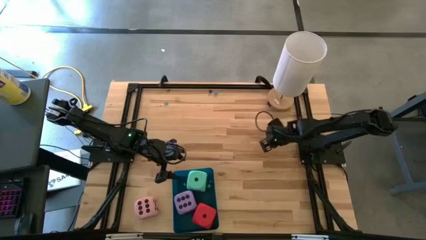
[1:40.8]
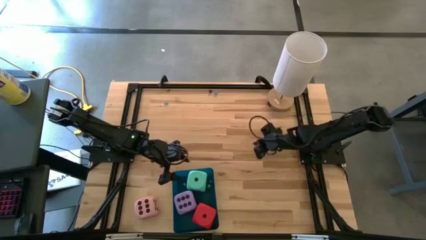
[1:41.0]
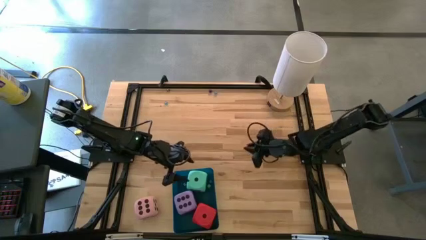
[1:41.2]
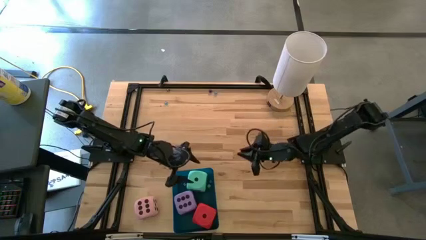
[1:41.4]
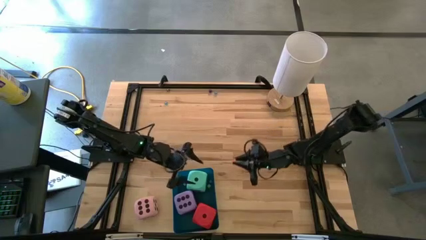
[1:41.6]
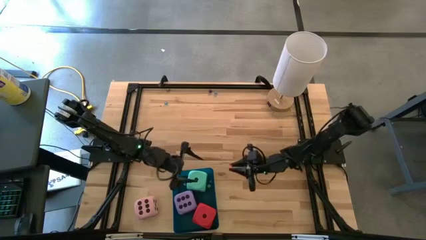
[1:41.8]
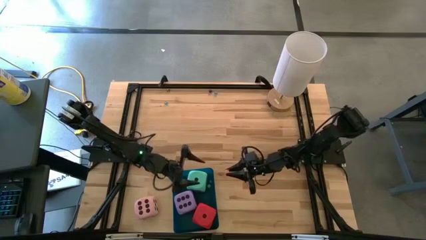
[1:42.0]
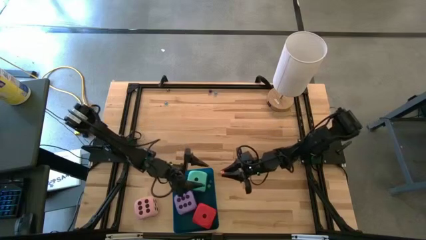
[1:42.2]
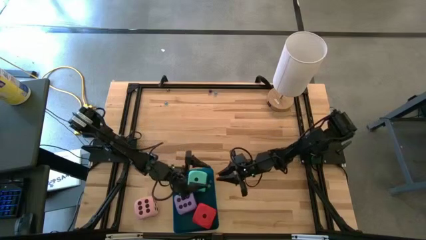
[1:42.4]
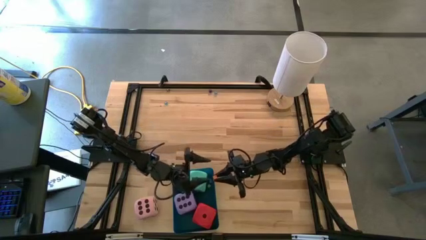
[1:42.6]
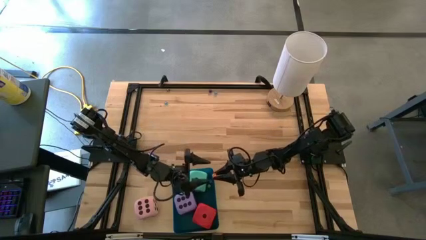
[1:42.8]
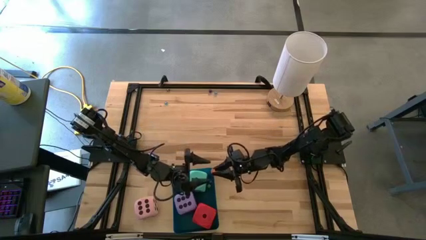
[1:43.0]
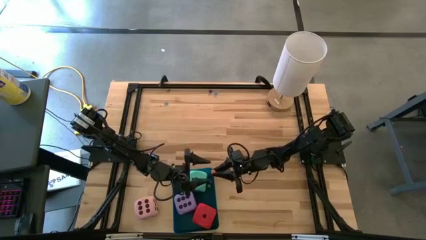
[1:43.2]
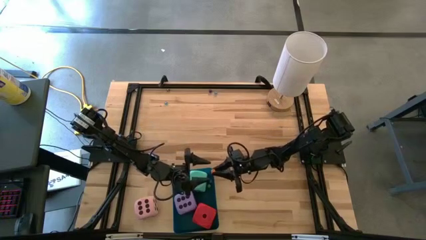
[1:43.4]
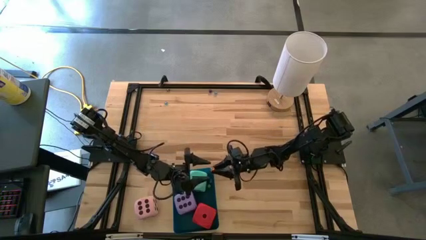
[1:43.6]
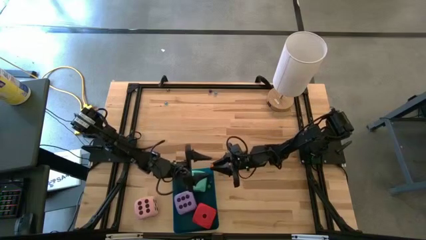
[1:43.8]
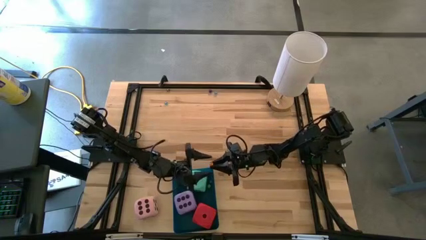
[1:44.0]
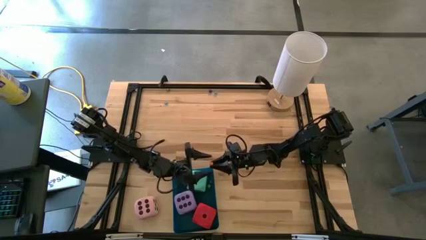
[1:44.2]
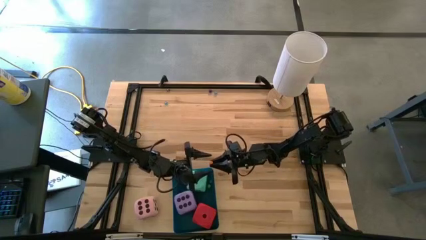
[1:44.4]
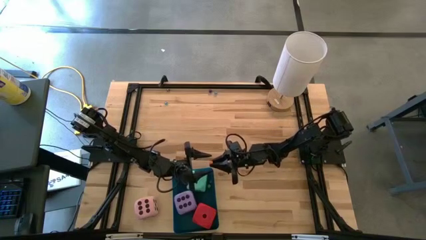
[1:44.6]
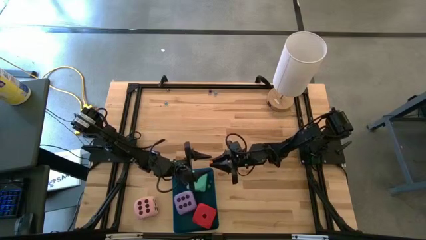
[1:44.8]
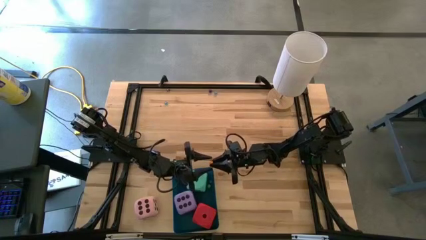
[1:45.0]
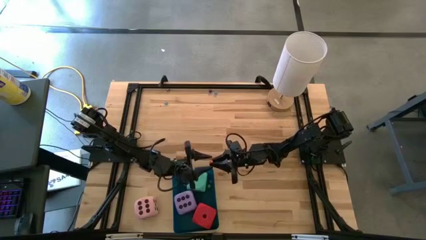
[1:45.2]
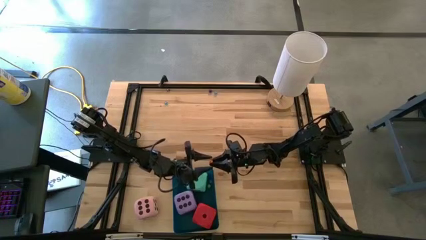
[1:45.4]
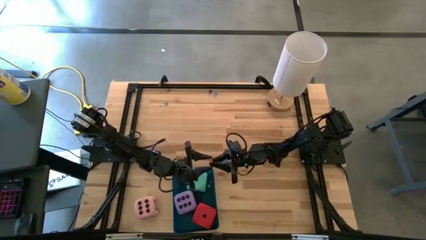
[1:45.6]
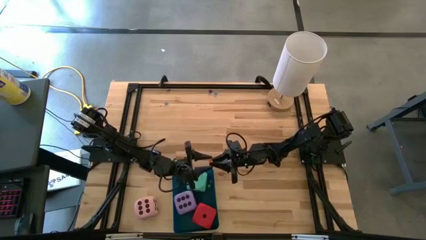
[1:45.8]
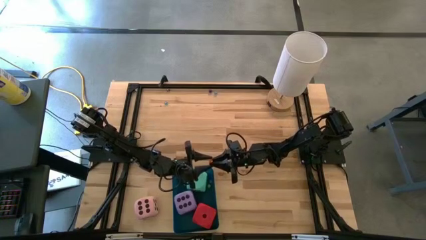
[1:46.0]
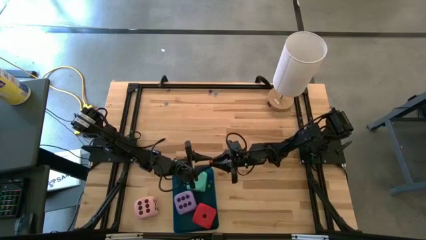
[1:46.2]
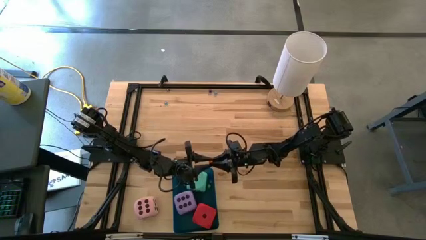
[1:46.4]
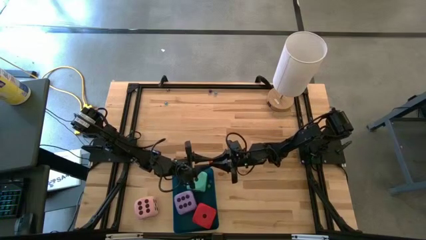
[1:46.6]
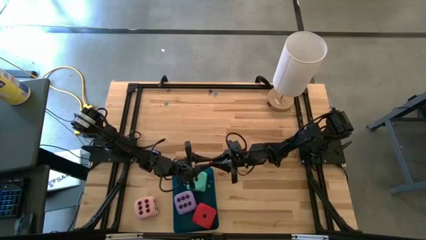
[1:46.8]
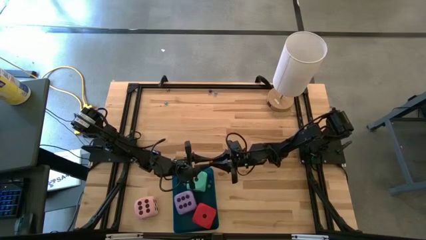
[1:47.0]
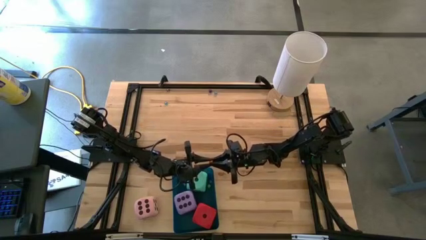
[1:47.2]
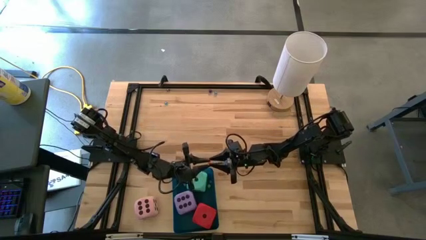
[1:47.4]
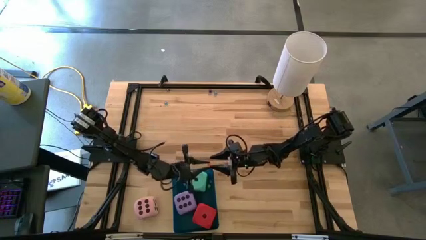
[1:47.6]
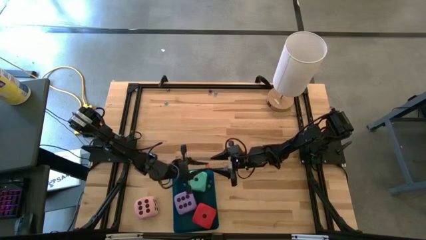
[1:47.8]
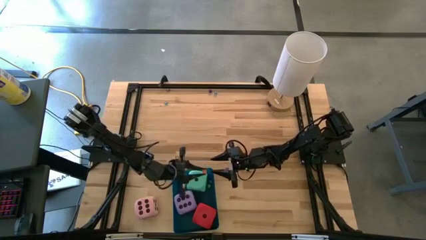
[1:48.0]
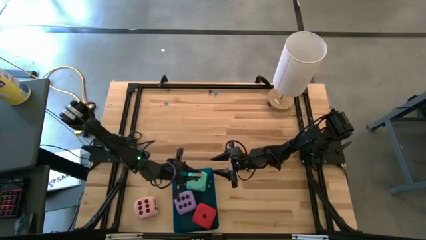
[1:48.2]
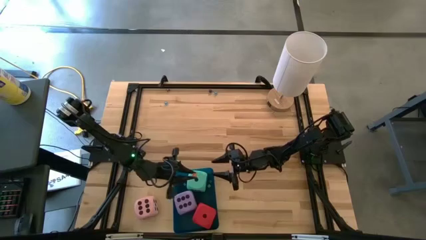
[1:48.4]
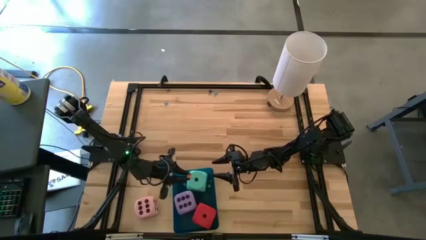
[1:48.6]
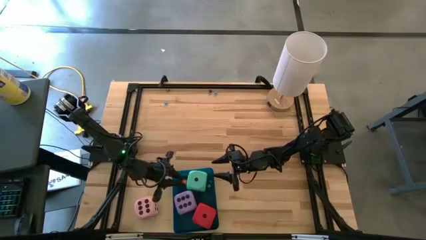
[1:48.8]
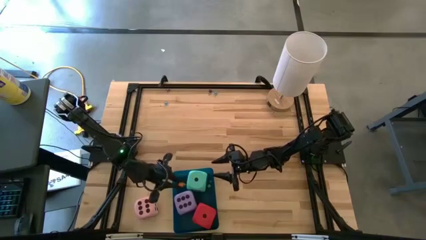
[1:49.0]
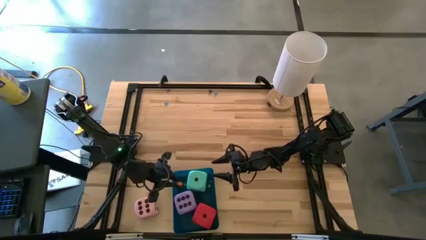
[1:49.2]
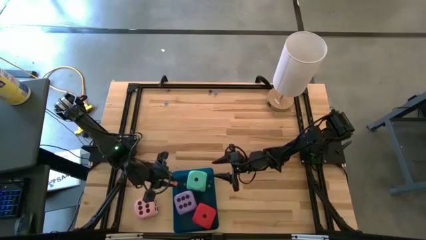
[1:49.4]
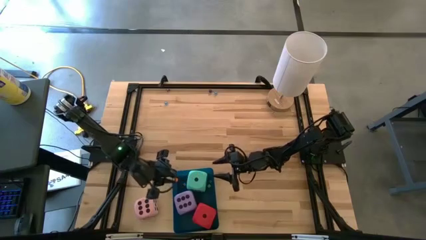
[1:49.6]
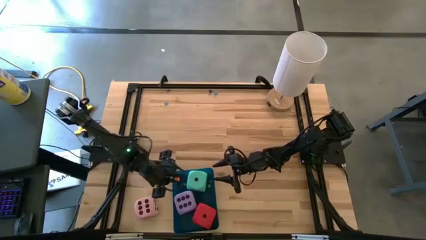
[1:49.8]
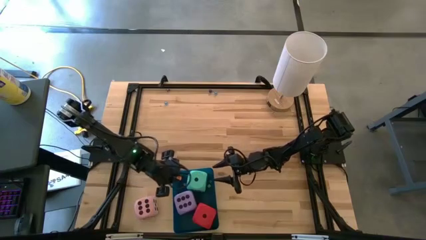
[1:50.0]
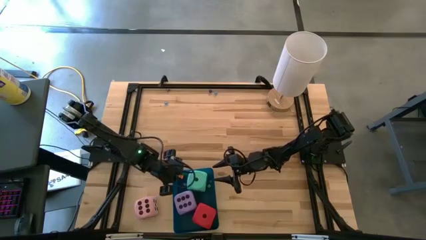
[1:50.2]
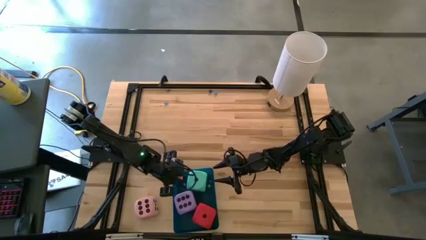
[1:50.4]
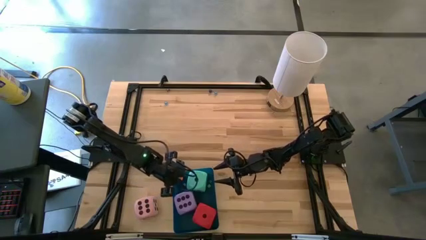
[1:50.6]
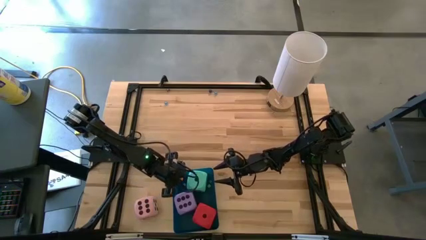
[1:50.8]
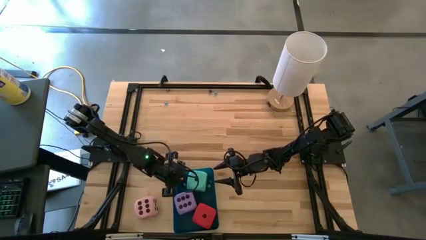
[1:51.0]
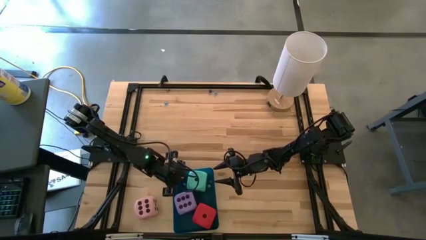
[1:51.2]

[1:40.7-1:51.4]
Task: Pick & Place Dice
Put the small orange die into the blue bin
